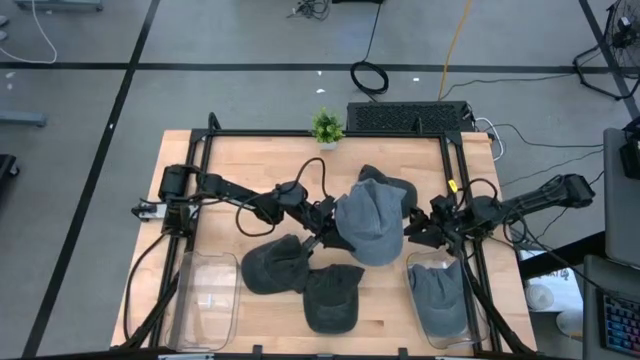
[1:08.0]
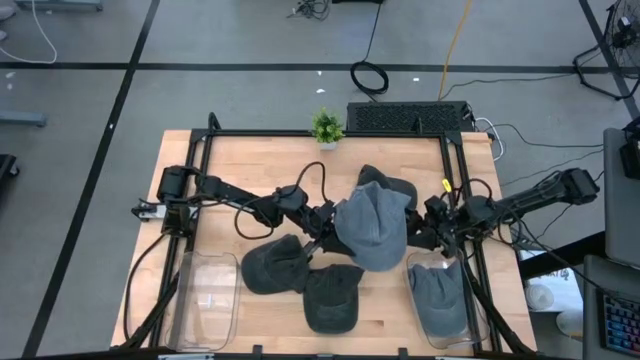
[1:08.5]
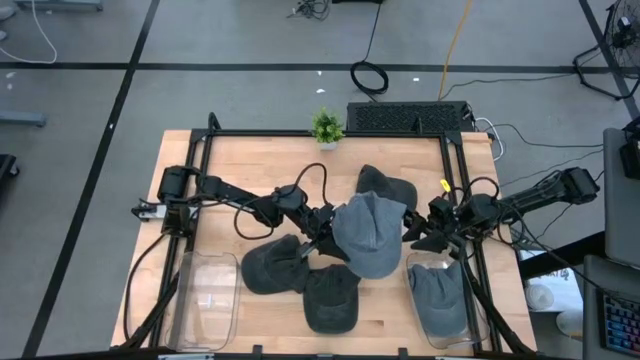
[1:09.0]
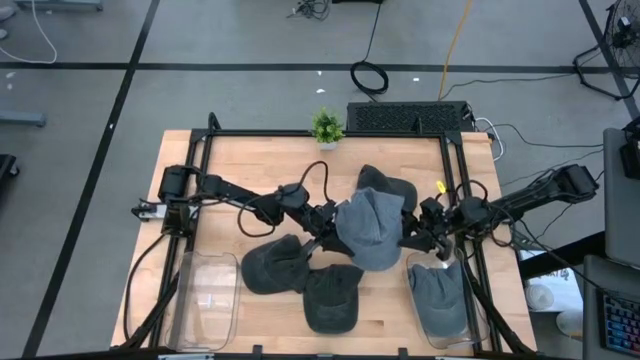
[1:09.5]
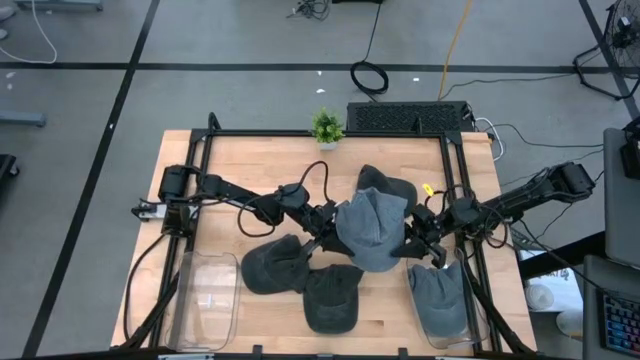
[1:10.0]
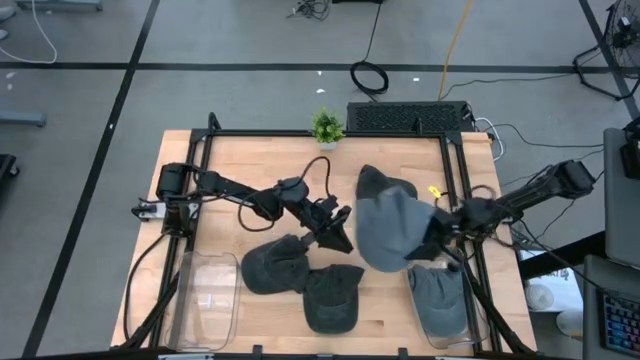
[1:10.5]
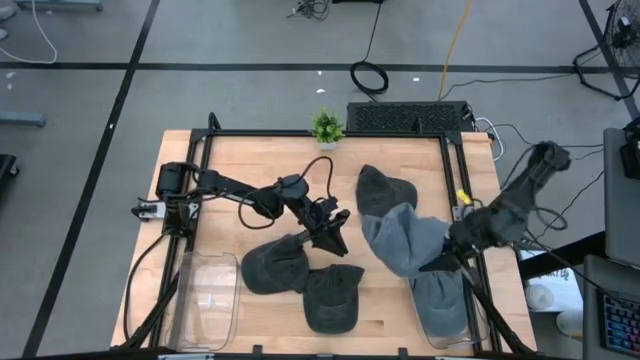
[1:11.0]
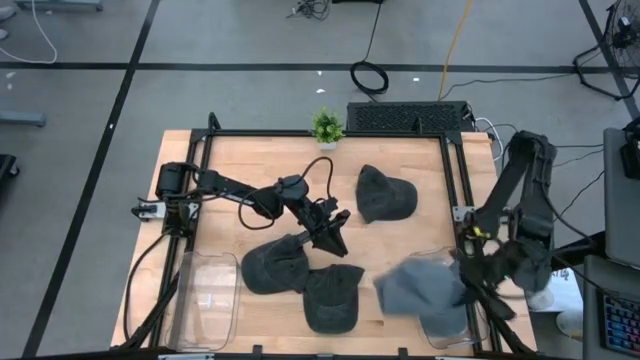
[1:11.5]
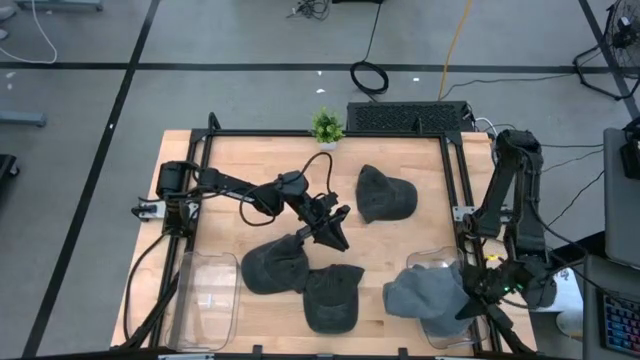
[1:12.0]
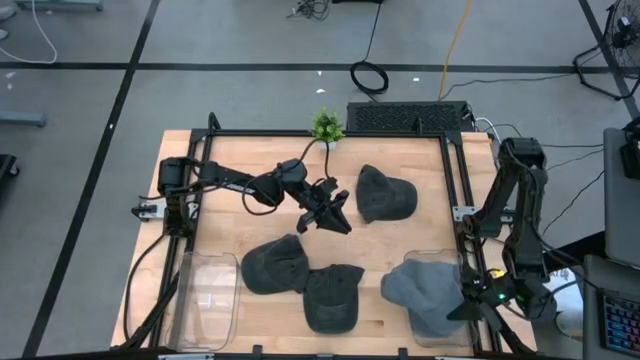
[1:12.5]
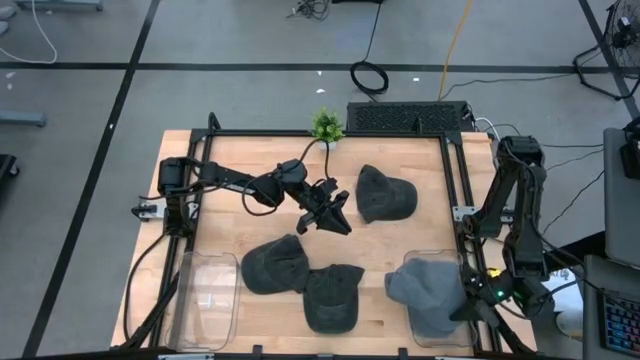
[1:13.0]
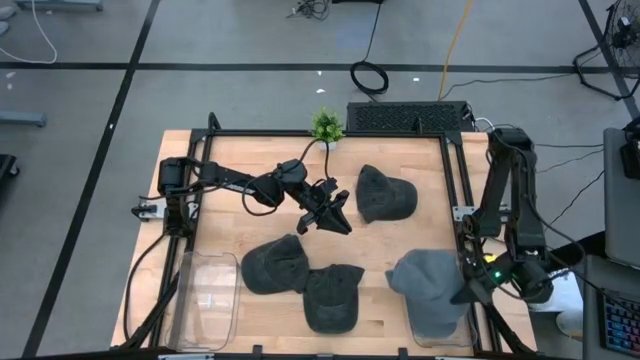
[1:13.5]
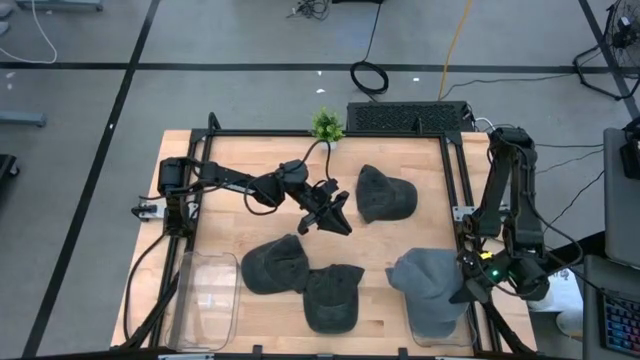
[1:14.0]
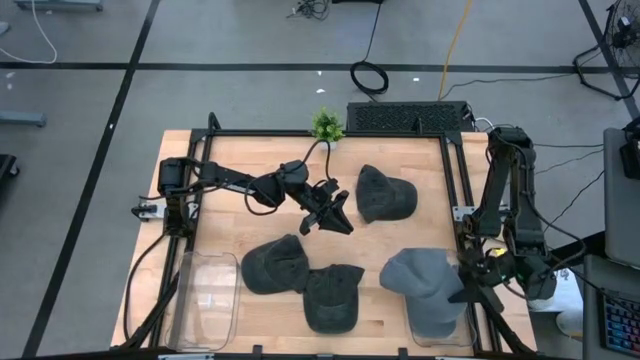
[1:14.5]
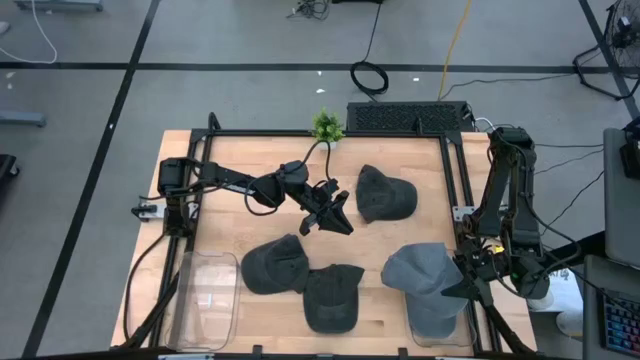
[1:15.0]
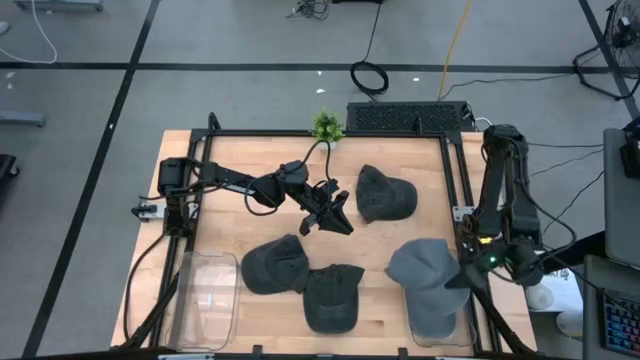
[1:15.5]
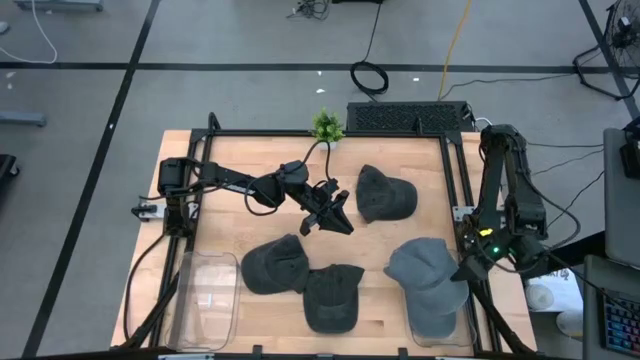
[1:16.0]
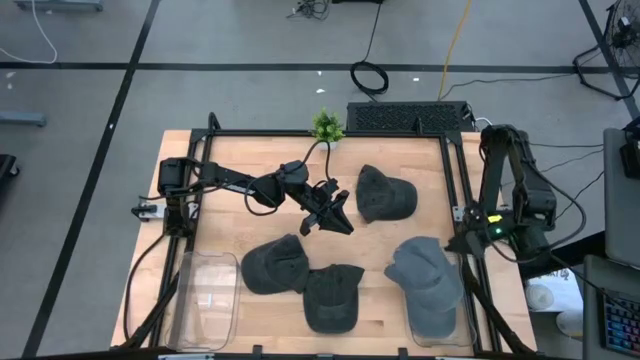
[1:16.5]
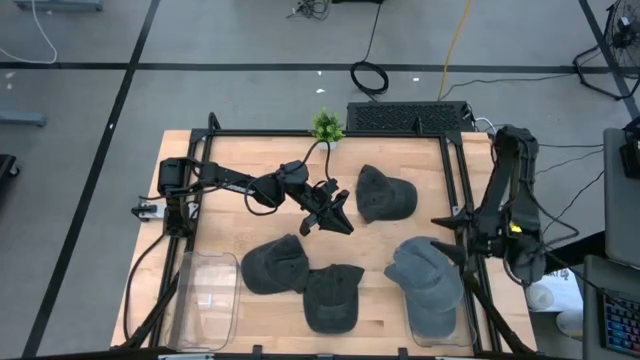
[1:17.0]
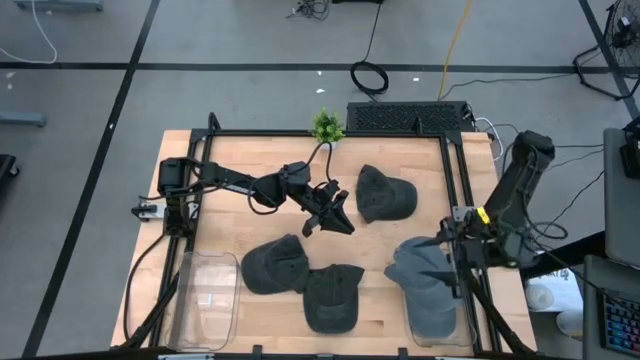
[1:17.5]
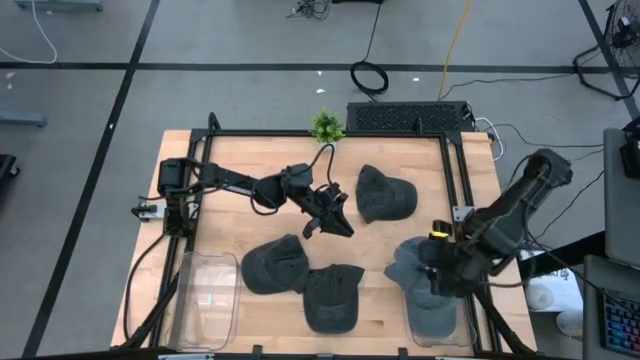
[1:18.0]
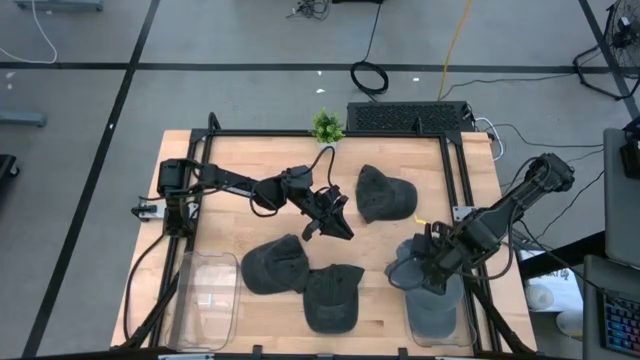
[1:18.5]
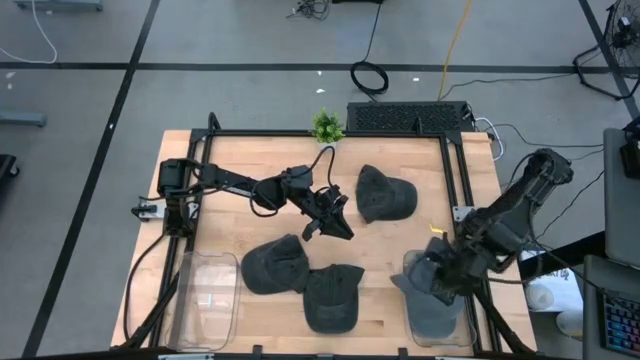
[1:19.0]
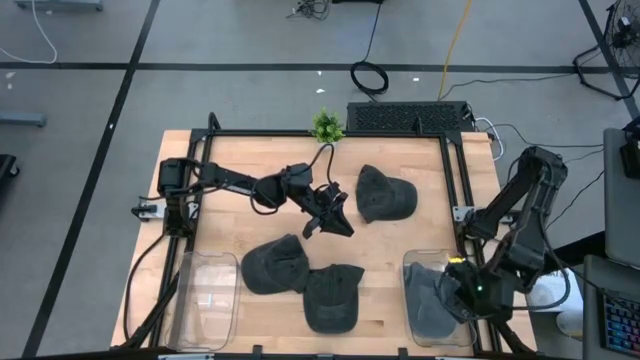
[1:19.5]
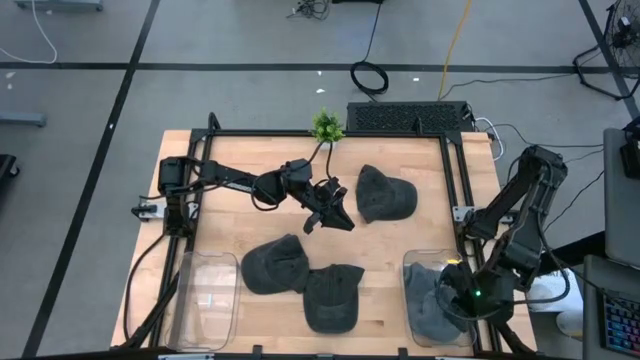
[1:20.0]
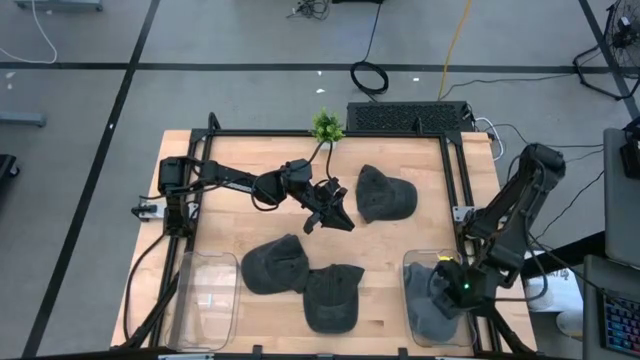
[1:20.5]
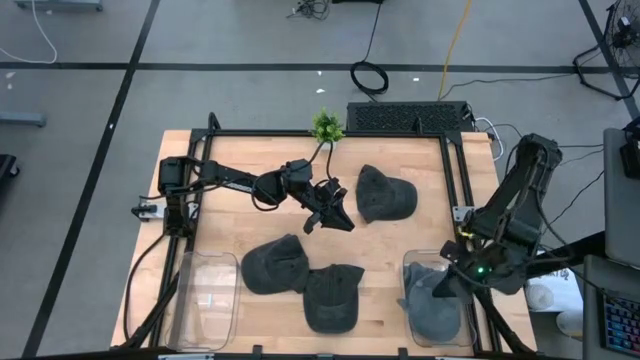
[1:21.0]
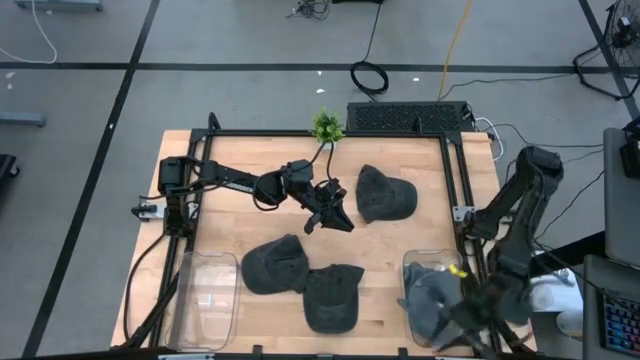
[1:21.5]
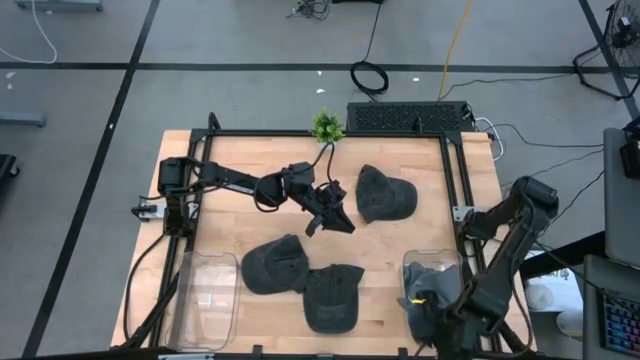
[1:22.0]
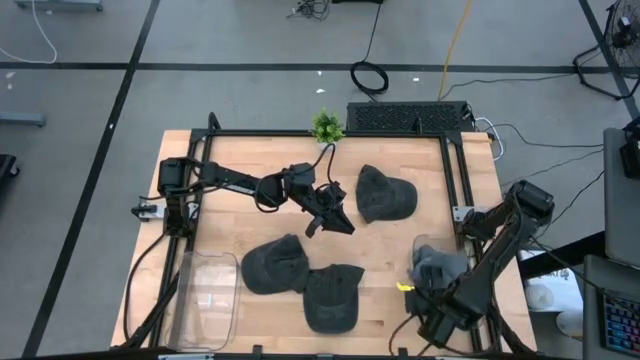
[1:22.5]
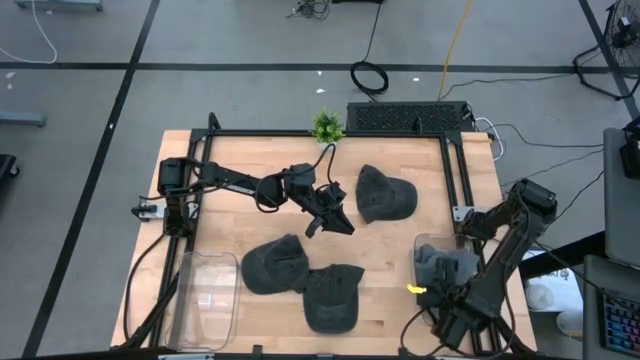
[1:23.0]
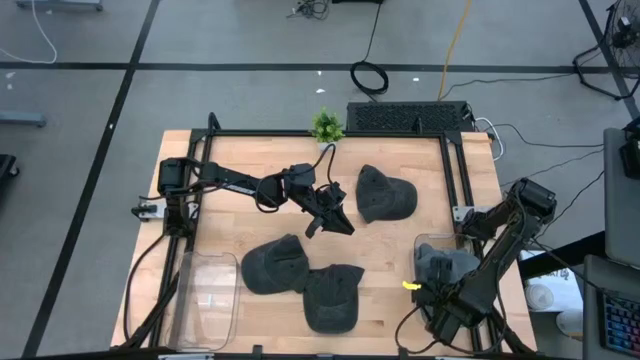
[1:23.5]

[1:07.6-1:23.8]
Task: Pick & Place hat
Put the gray cap into the right transparent bin
